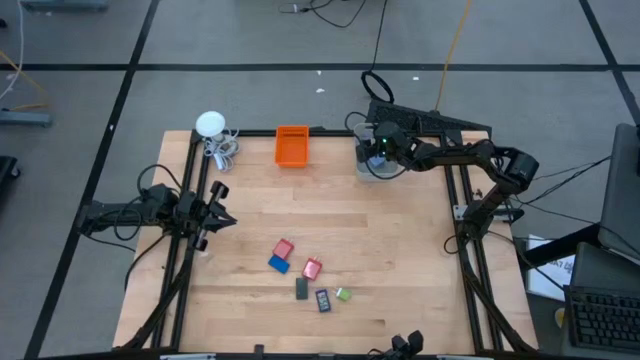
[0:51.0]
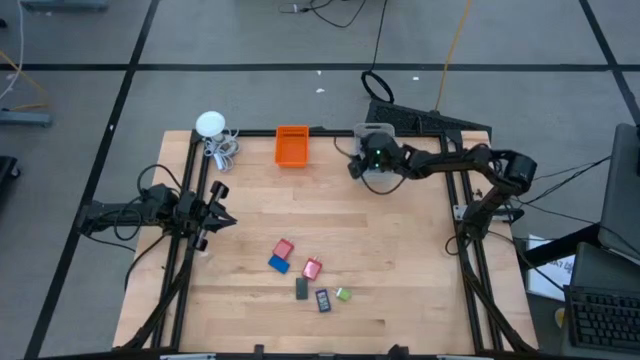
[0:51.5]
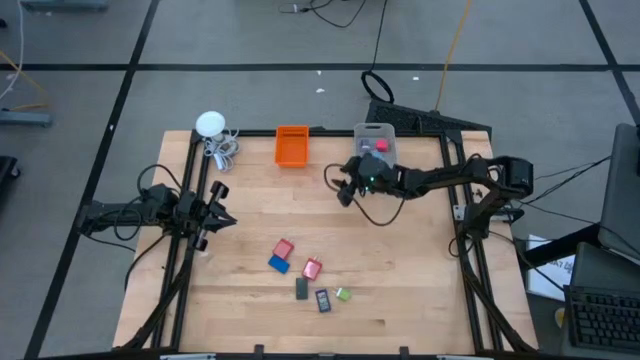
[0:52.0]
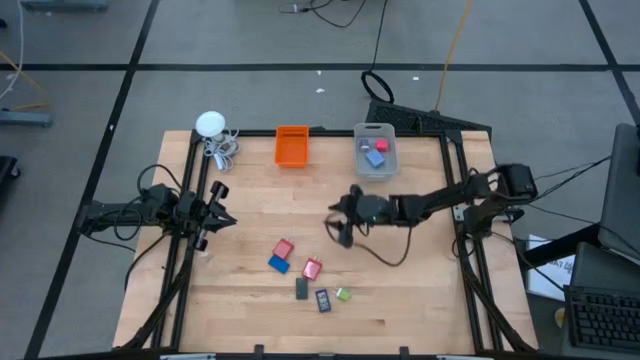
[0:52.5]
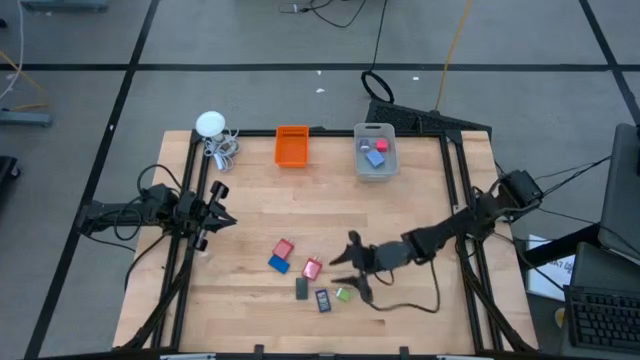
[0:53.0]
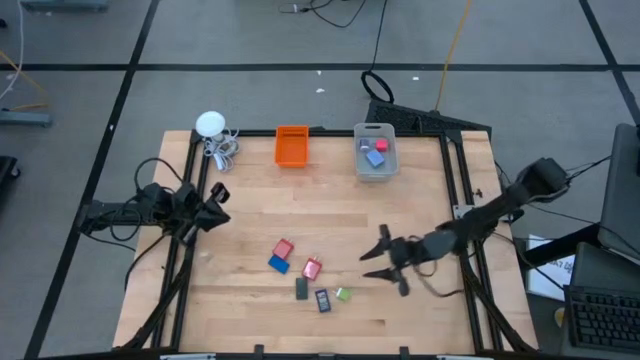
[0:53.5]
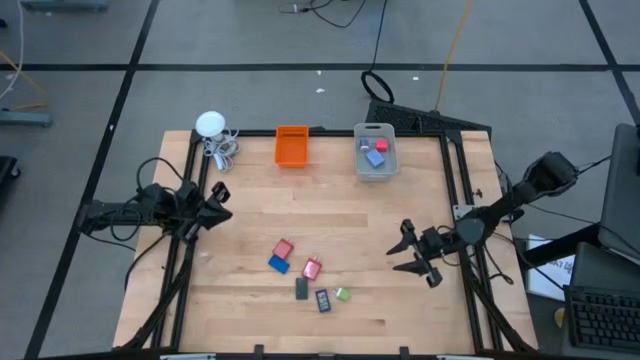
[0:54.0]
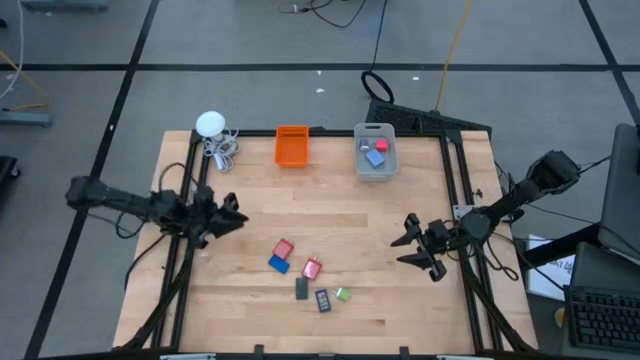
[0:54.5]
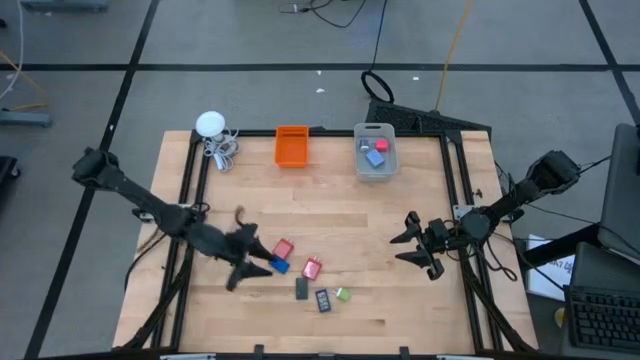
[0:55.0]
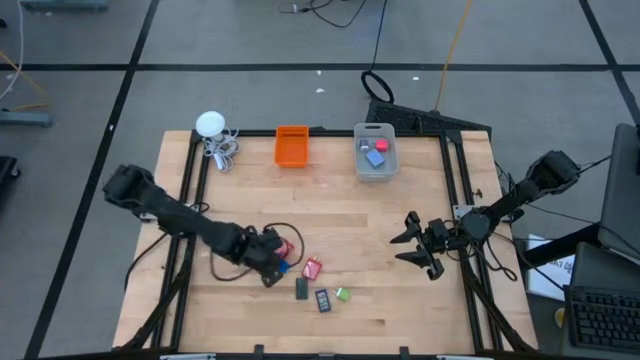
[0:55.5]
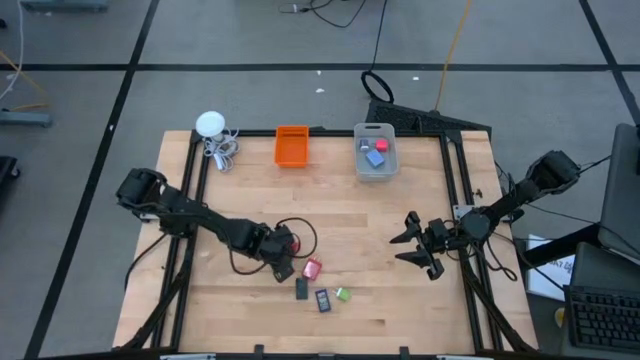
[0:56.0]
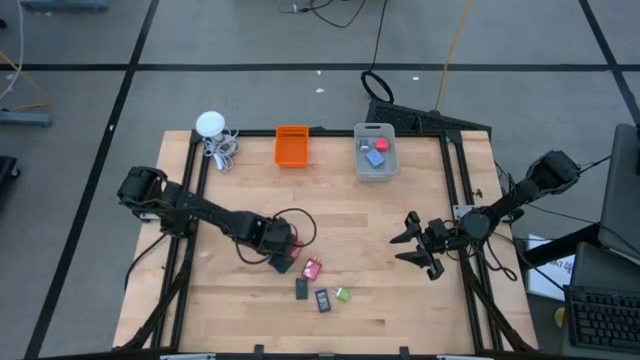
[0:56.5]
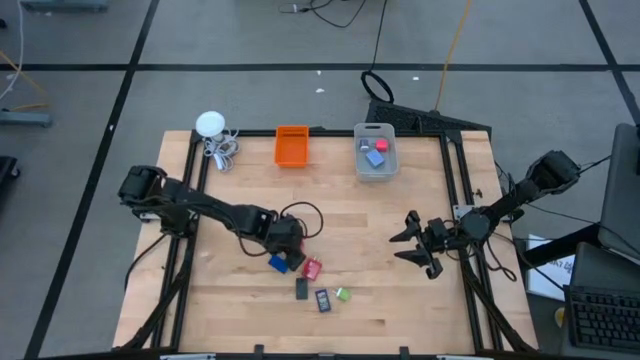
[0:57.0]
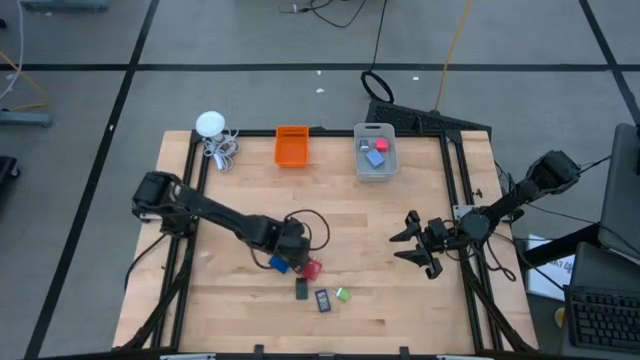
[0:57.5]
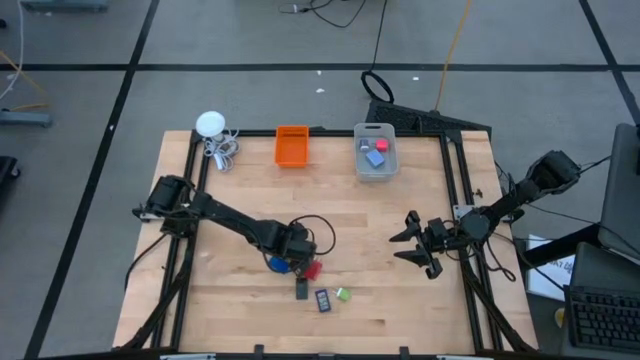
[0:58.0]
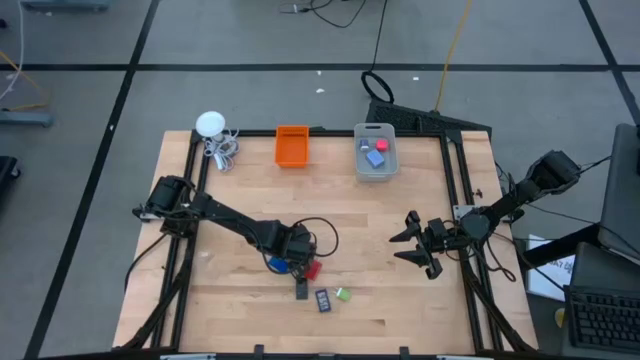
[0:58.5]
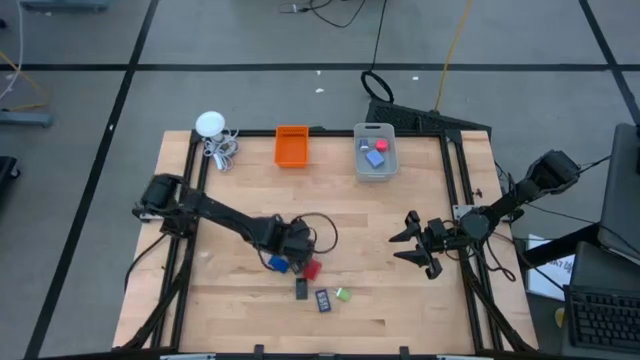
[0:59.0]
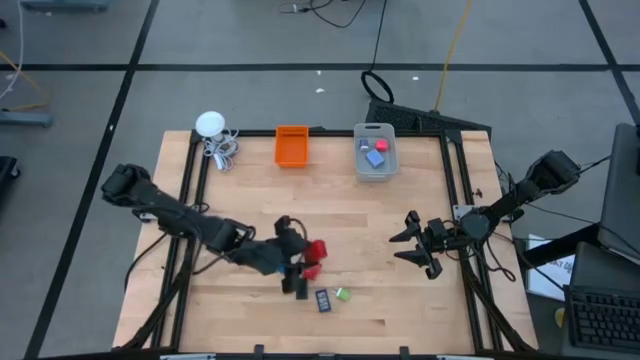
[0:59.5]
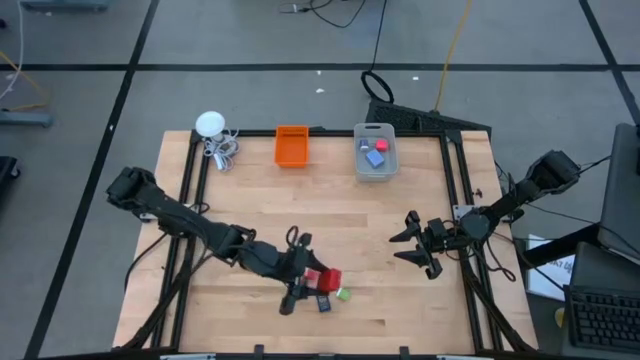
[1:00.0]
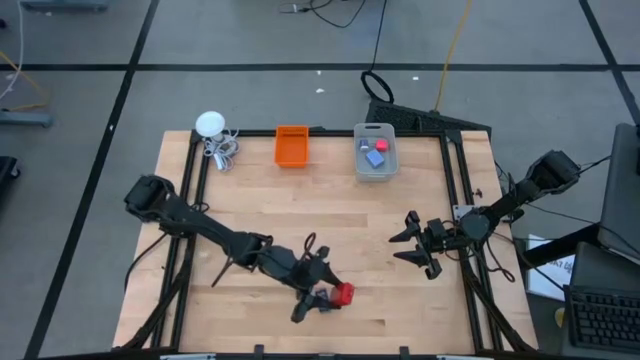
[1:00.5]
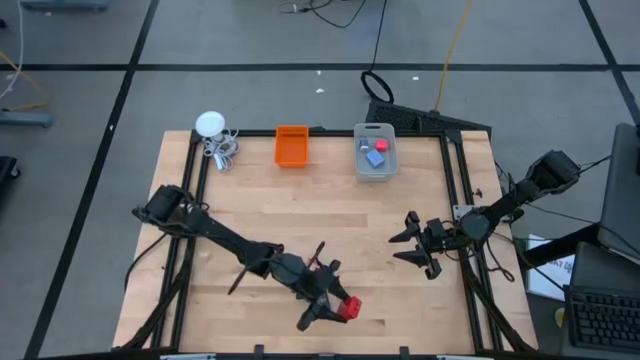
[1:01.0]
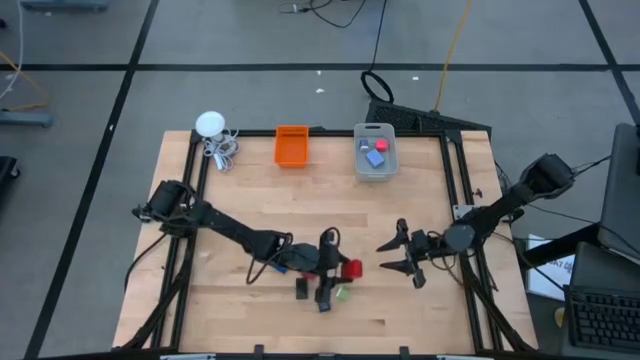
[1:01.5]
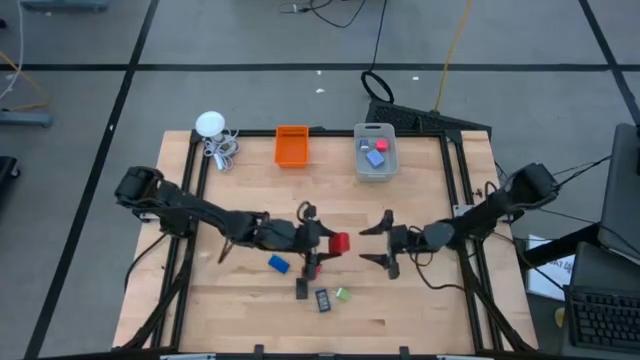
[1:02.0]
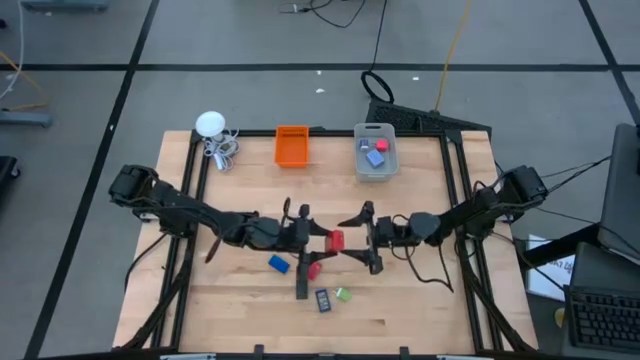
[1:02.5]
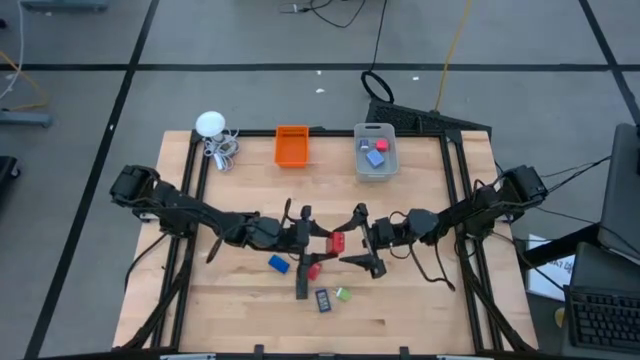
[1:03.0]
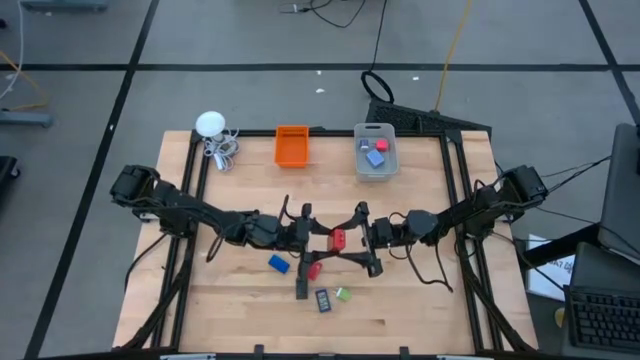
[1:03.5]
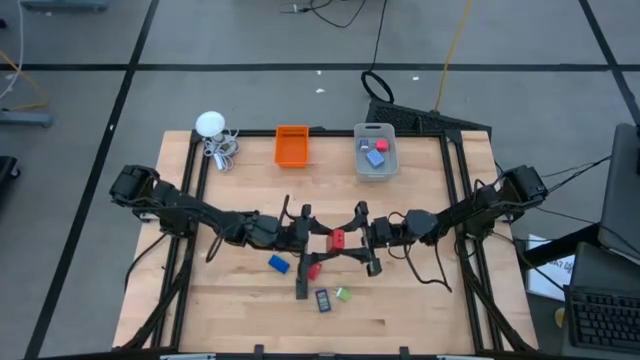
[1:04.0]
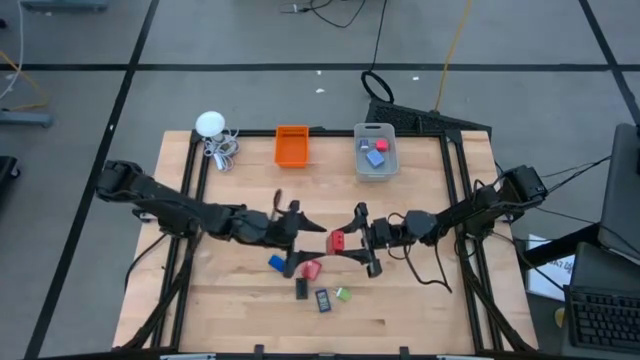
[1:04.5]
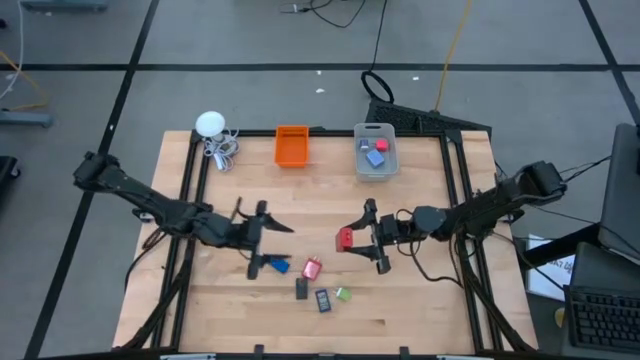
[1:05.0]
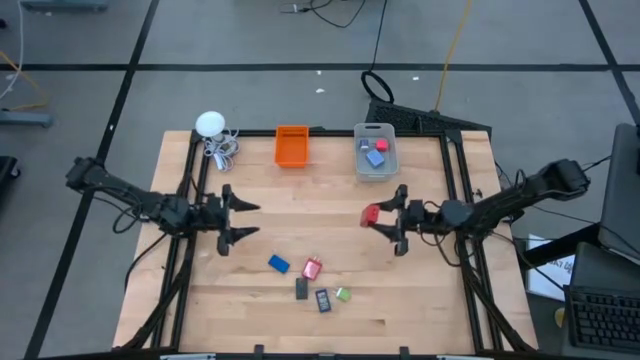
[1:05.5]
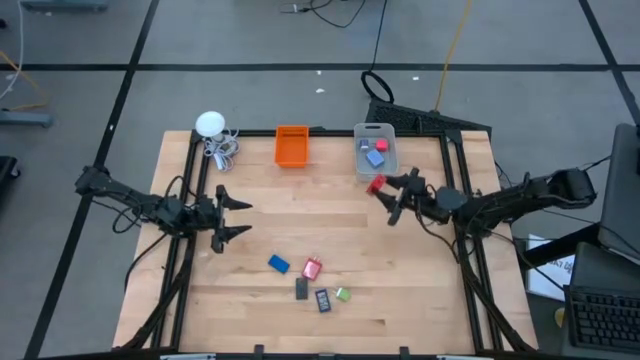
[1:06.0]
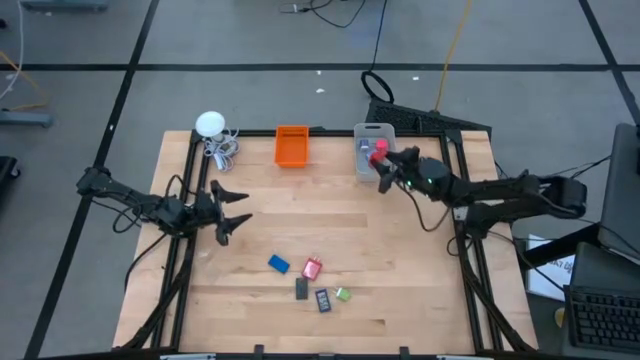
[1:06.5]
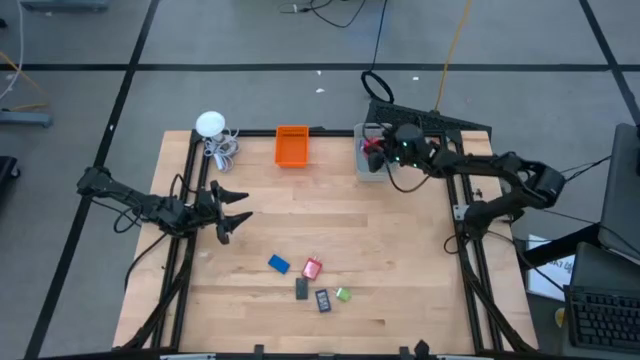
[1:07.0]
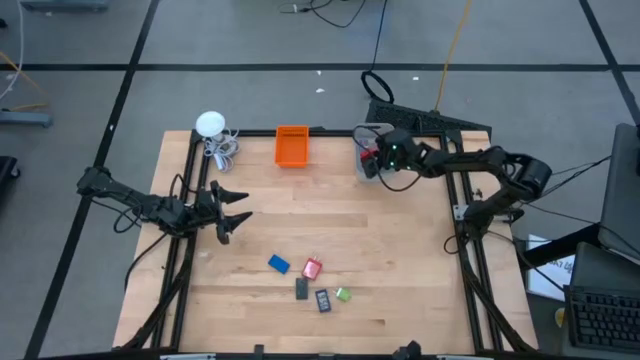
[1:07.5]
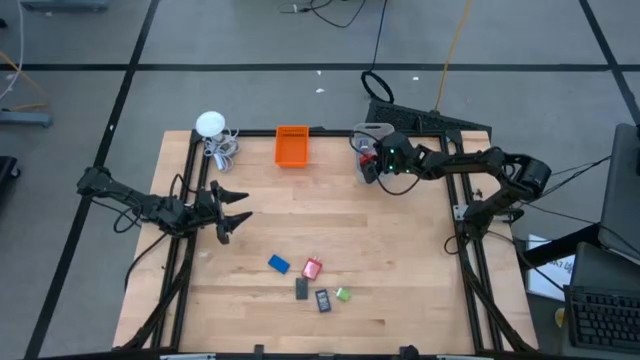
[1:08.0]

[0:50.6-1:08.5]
Task: Pick & Place Office items
Put the top red charger adapter into the gray bin

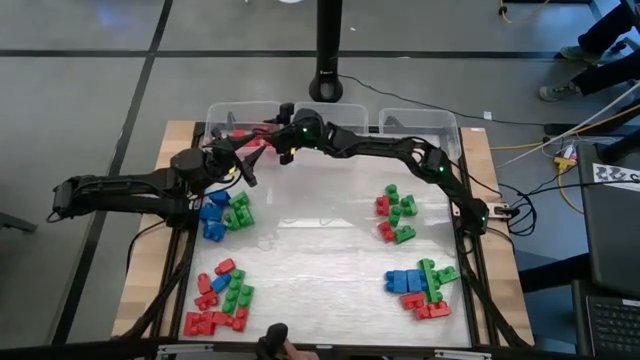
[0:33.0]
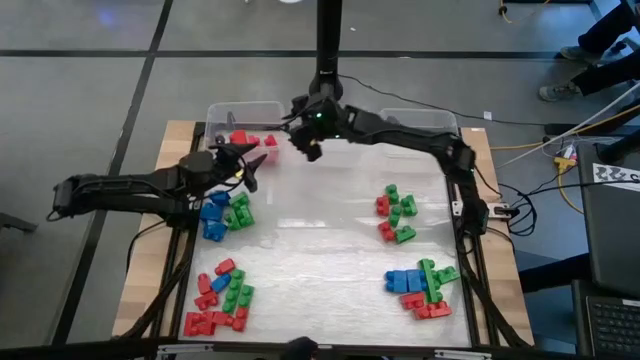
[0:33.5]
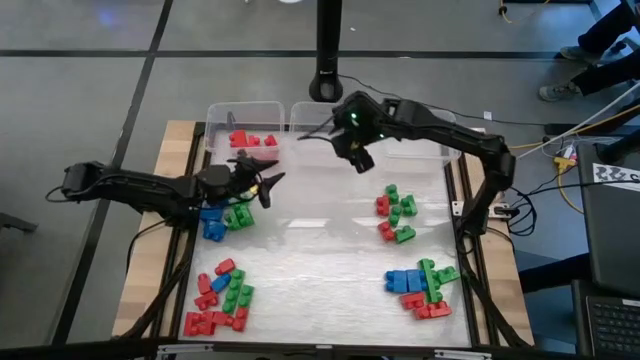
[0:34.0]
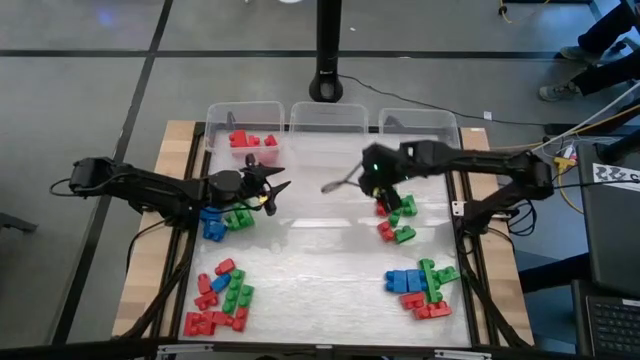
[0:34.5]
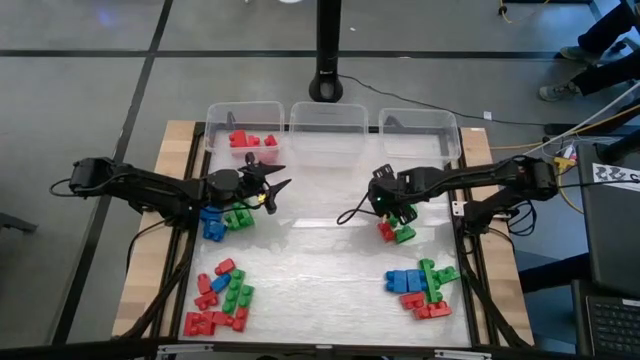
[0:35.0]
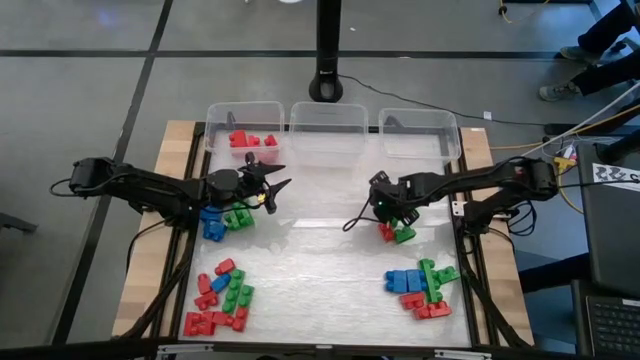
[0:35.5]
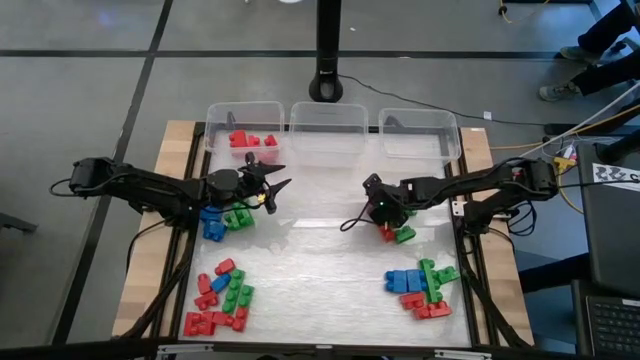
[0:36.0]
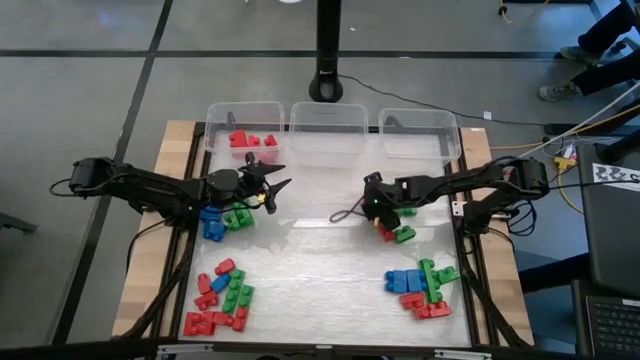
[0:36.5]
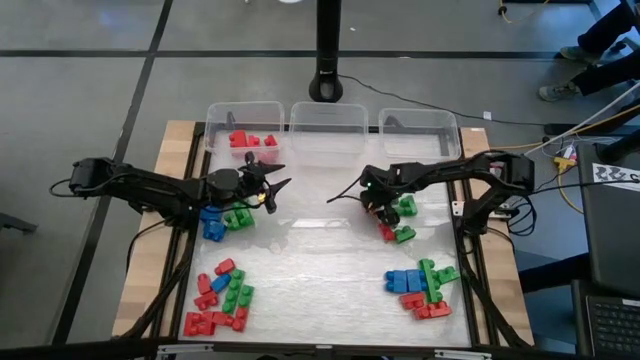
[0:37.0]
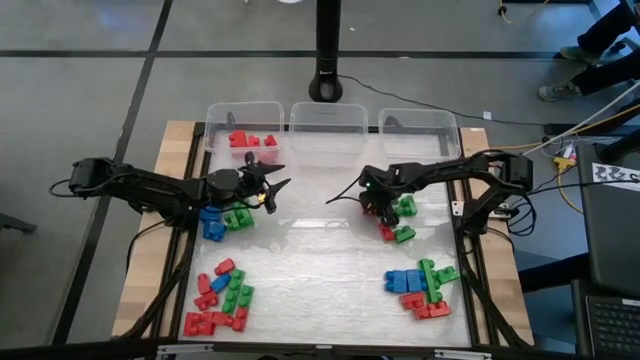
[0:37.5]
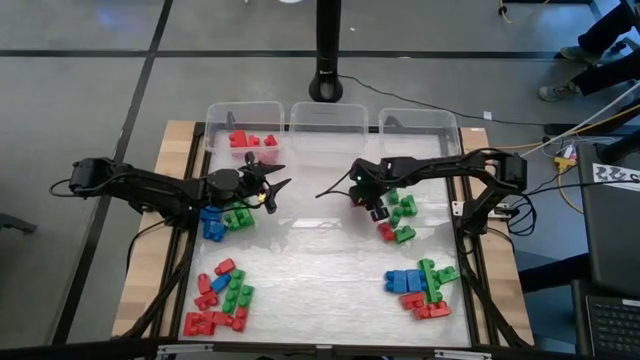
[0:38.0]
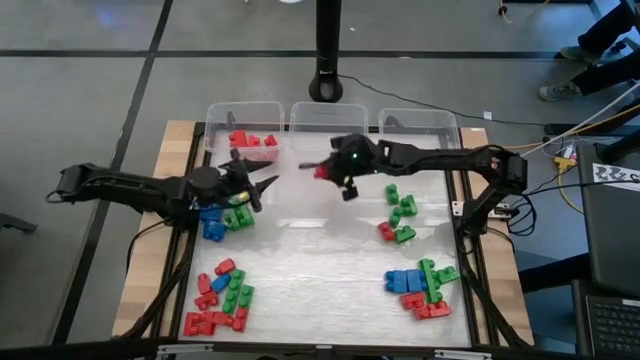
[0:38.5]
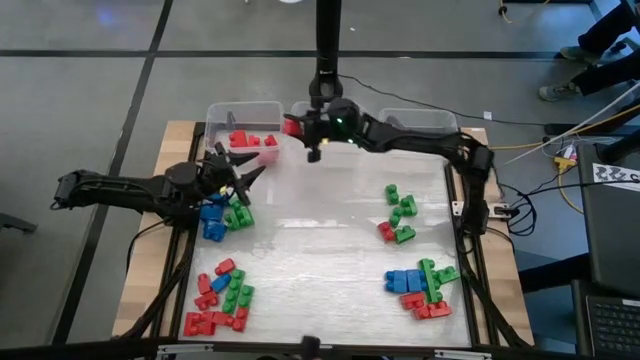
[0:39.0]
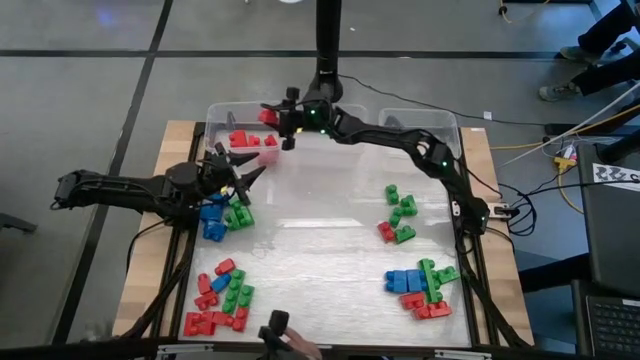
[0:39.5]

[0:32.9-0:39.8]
Task: Sort blocks
Put the red game piece into the left transparent bin
